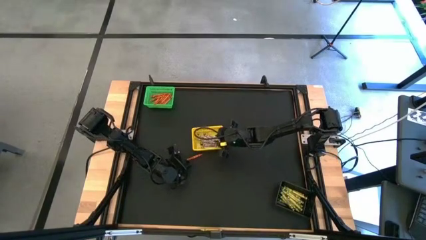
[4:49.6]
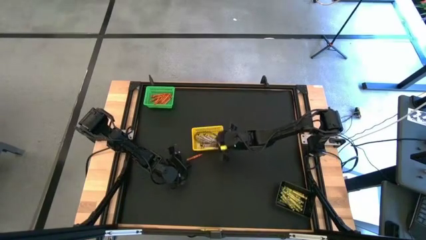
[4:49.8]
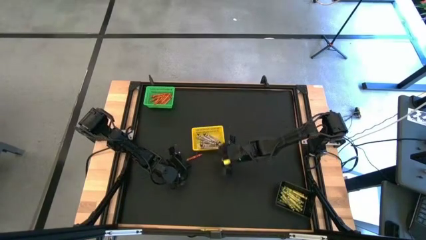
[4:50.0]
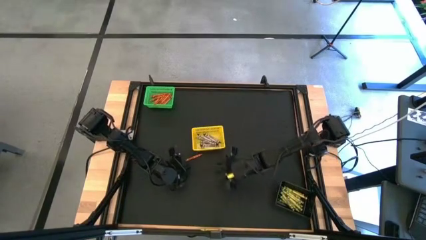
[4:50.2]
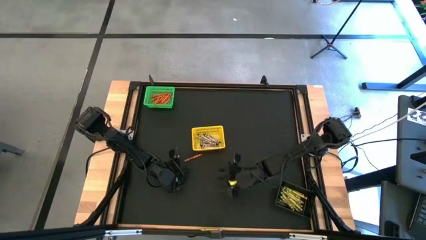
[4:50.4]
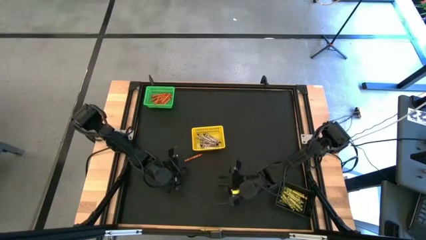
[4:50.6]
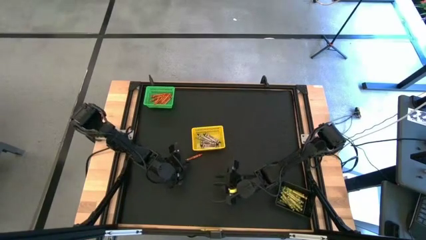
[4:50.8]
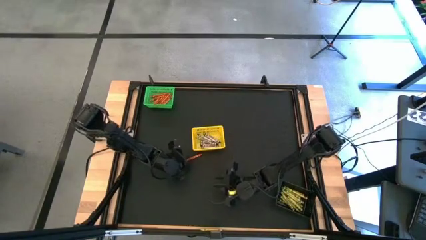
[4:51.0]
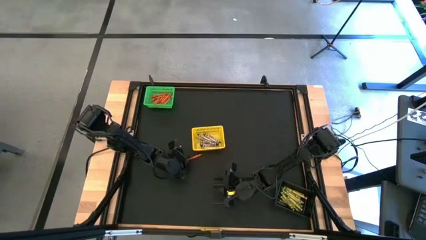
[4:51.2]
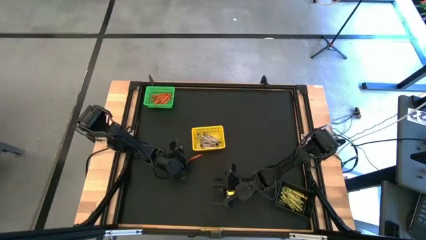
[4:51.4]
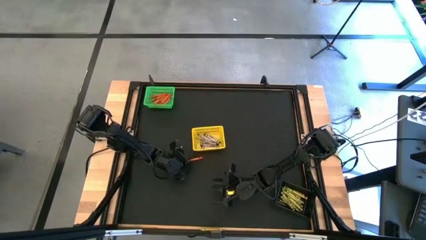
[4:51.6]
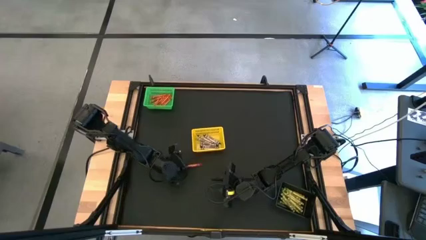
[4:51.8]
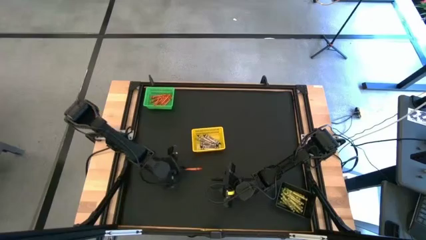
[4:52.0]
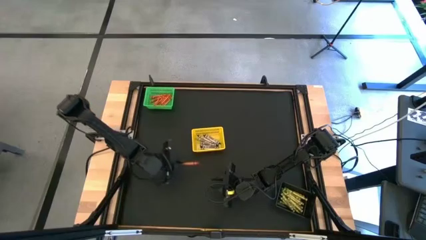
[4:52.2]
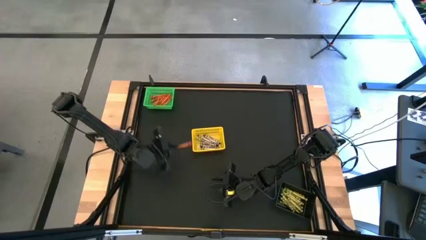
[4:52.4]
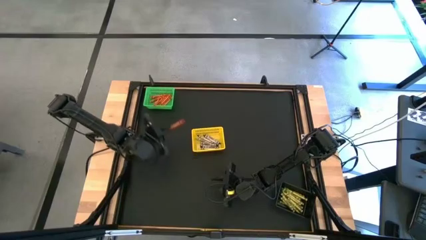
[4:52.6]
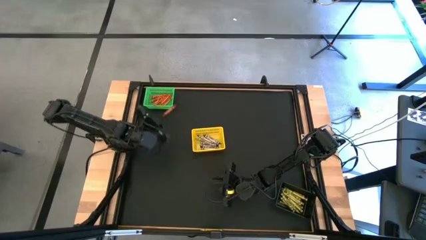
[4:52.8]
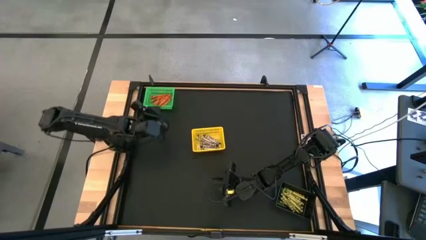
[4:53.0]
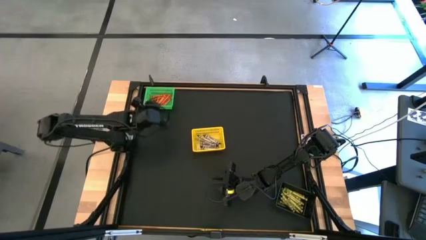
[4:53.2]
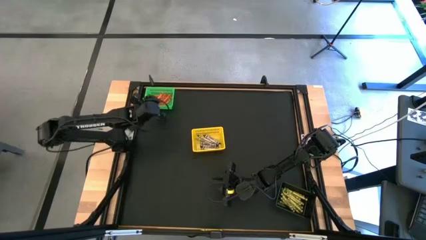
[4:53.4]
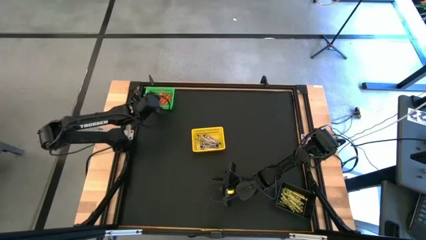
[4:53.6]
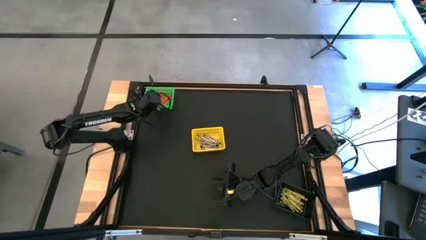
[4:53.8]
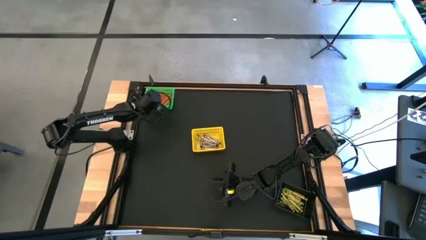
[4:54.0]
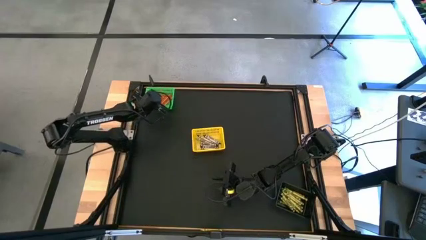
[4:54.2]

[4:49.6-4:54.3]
Task: Sort crayons
Put the orange crayon into the green bin

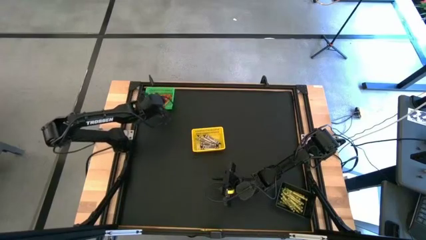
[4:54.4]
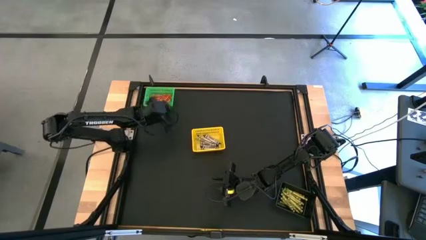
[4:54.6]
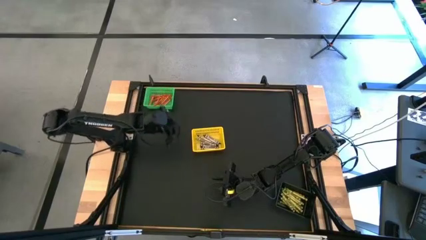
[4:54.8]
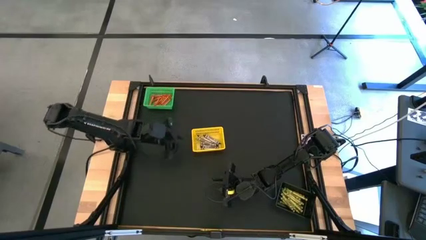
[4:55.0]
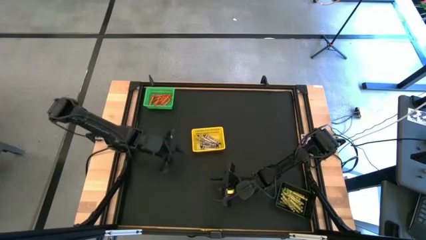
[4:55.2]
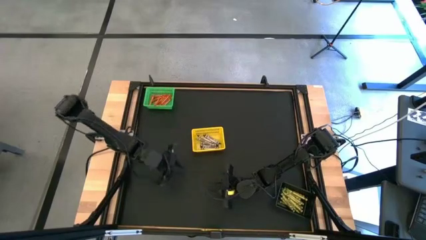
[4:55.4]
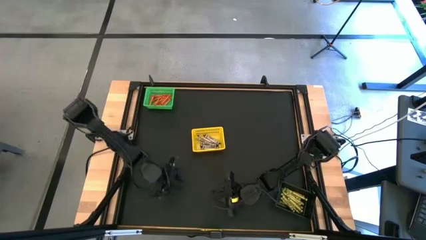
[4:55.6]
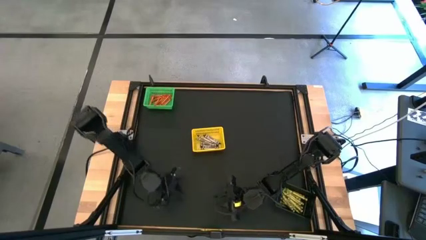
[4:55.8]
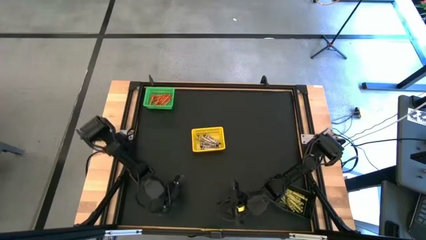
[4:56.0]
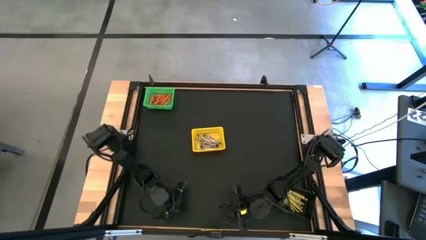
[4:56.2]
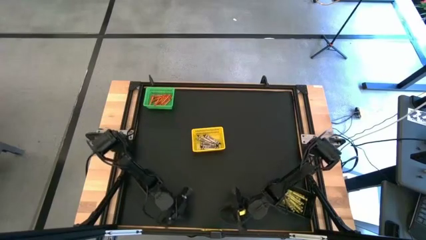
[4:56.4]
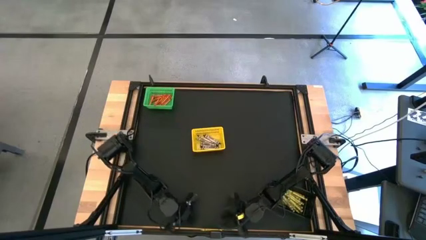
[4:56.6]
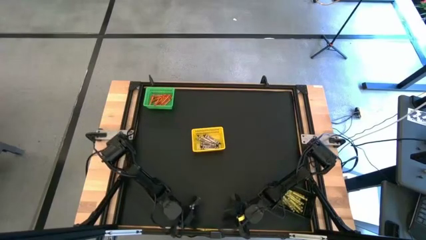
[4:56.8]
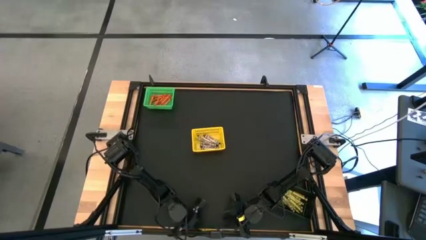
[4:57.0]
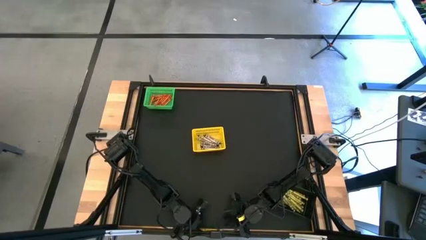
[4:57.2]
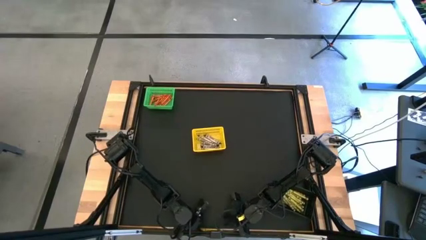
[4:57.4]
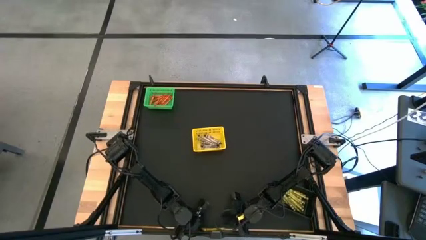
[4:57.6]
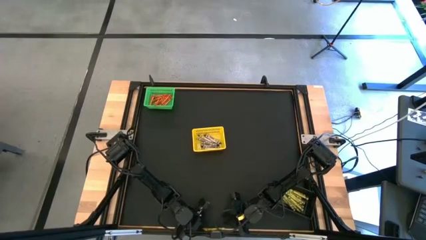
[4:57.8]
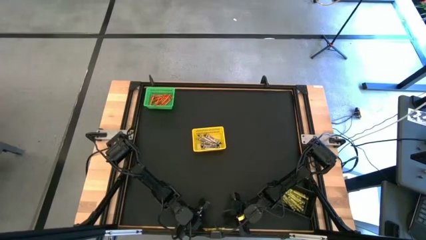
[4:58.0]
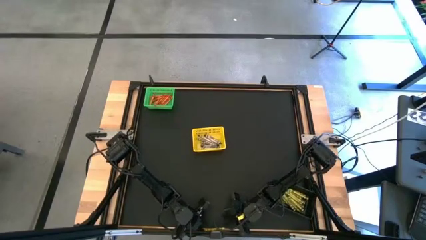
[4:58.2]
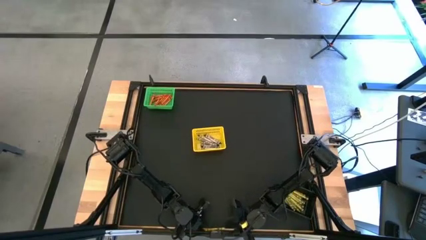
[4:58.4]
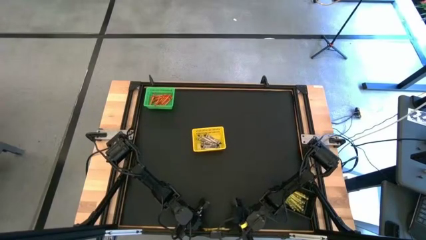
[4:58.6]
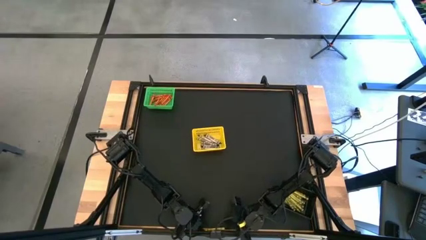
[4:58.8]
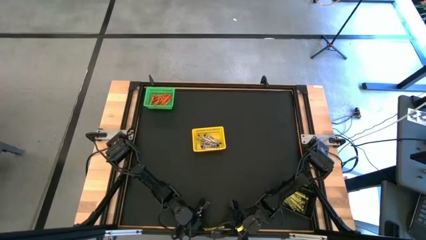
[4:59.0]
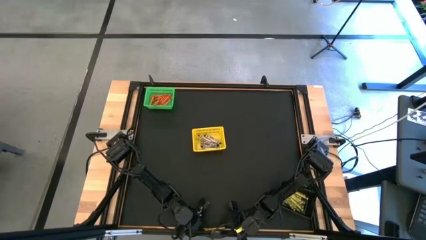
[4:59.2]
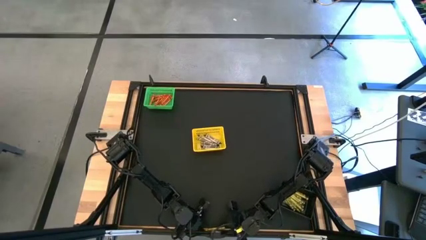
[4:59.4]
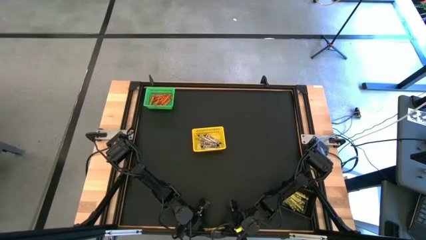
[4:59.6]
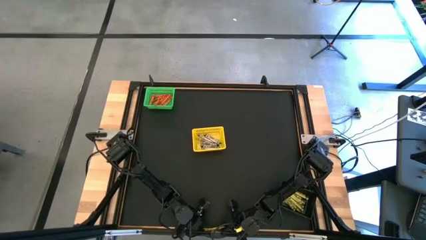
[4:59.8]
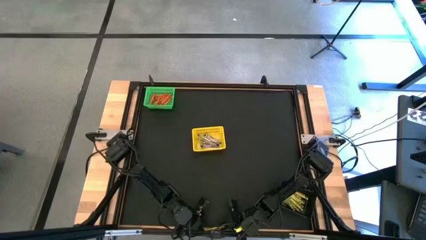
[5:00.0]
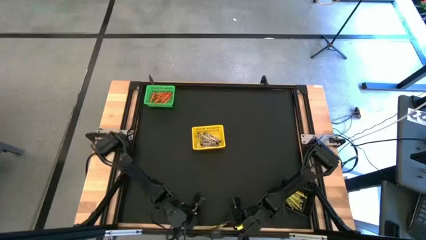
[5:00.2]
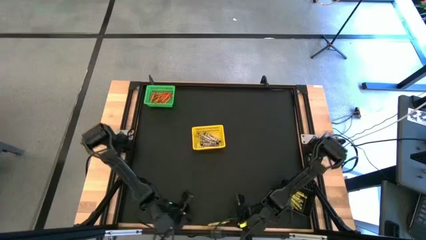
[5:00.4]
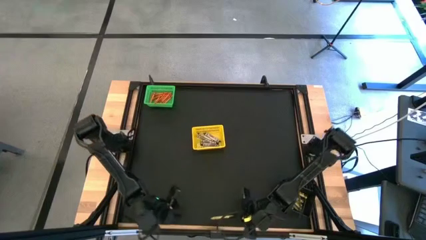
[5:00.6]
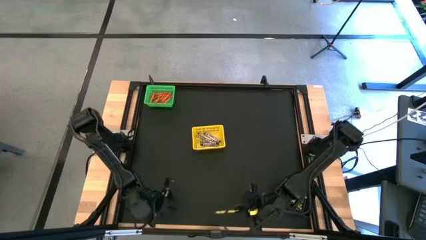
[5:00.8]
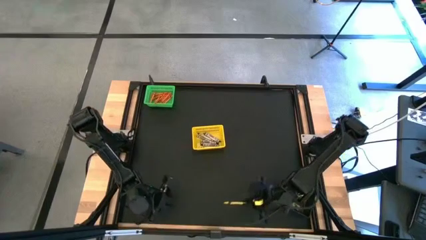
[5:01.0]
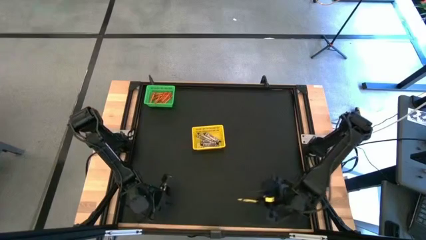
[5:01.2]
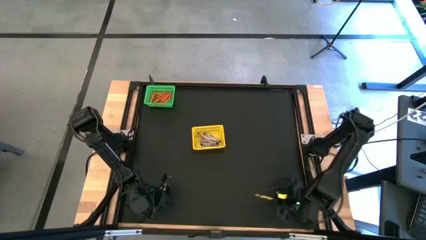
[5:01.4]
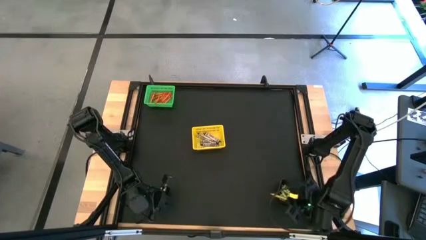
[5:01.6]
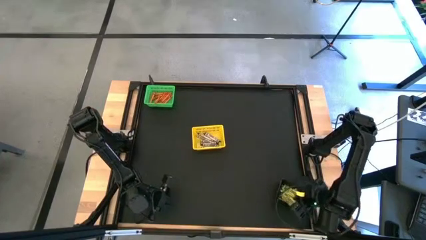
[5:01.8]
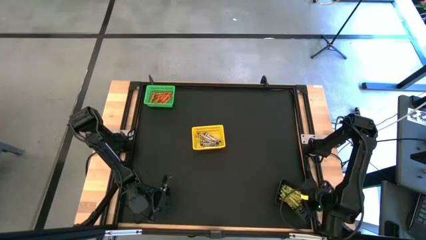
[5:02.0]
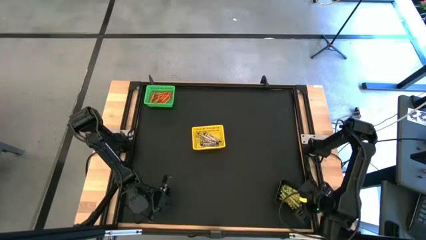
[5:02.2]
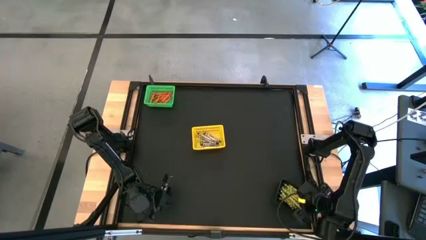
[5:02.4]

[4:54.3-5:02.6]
Put the green crayon into the black bin
